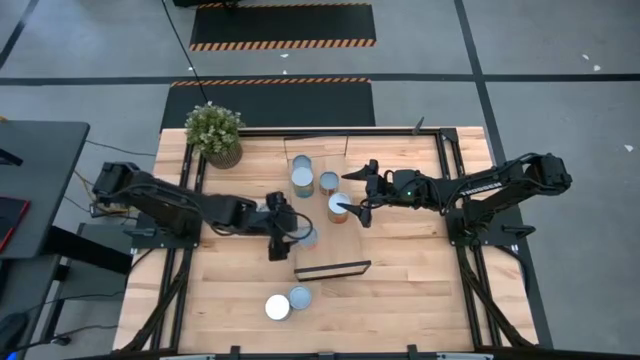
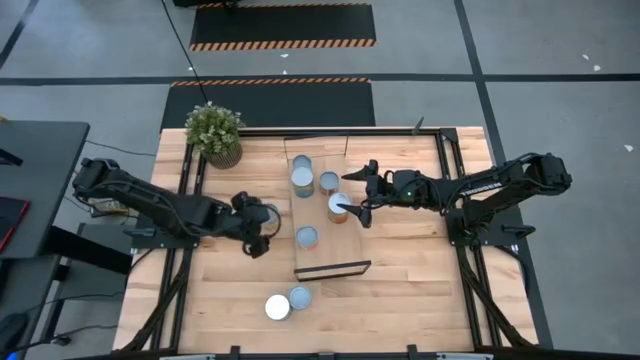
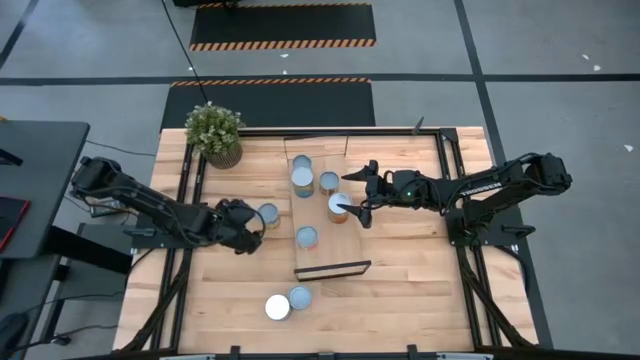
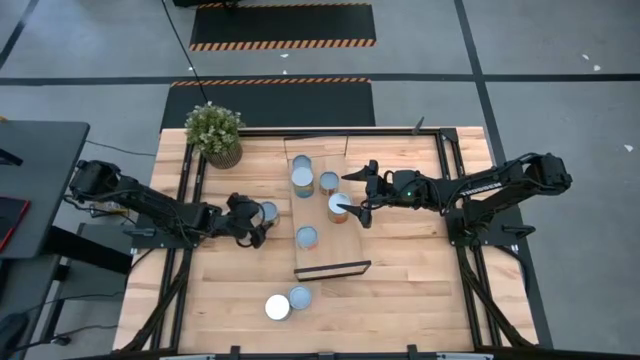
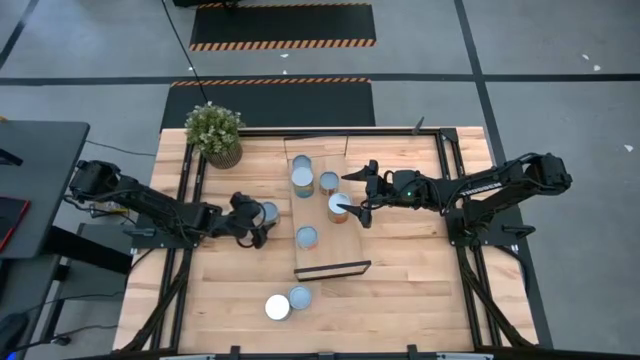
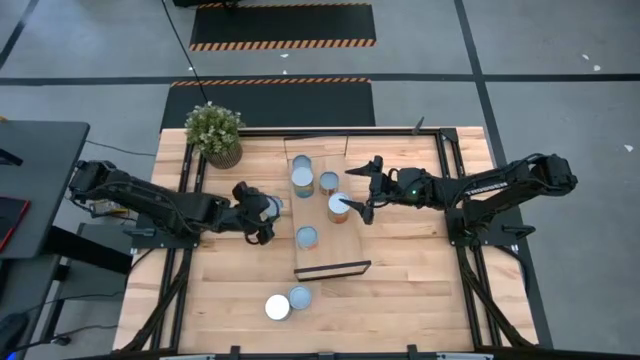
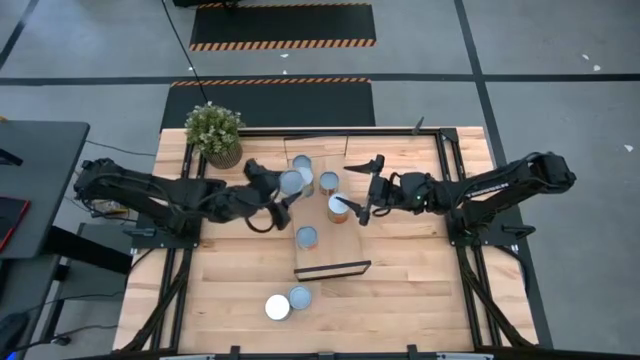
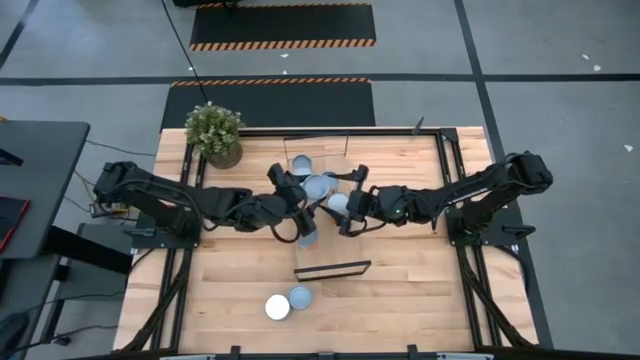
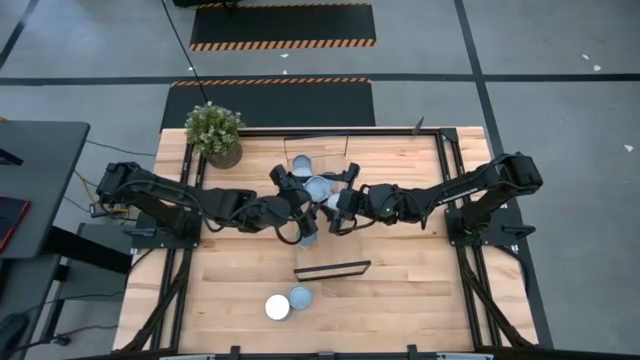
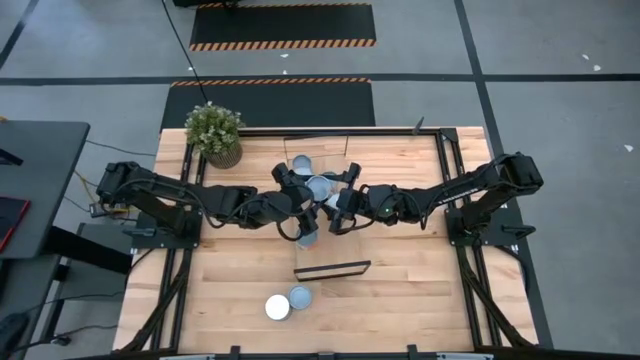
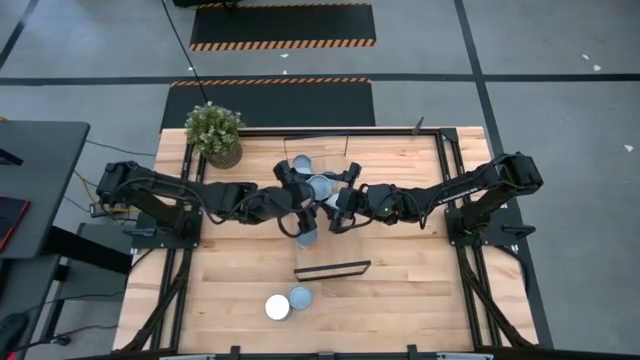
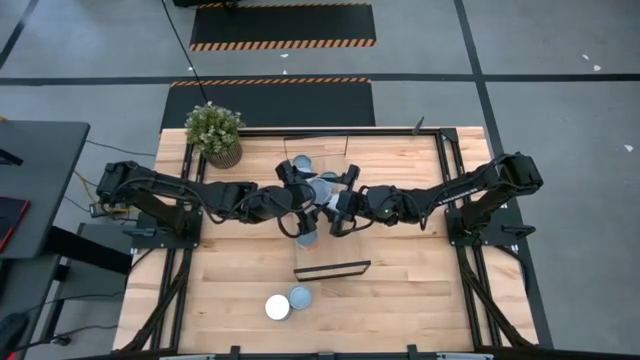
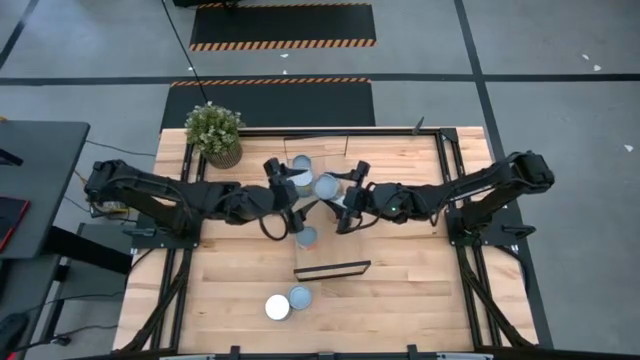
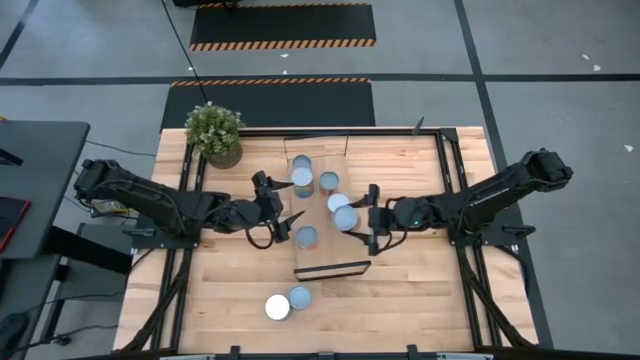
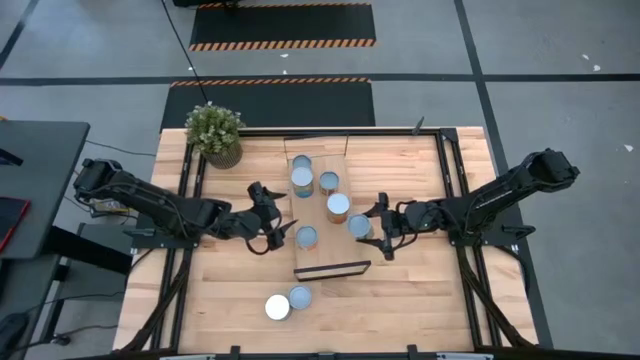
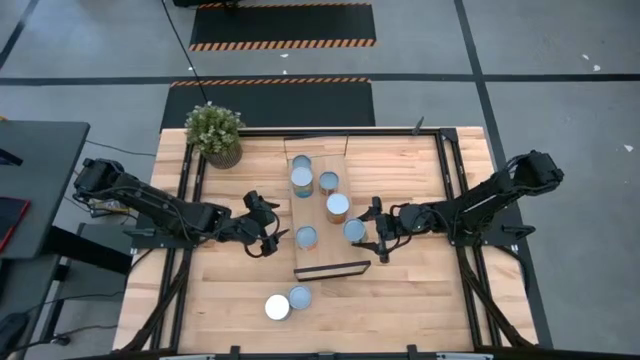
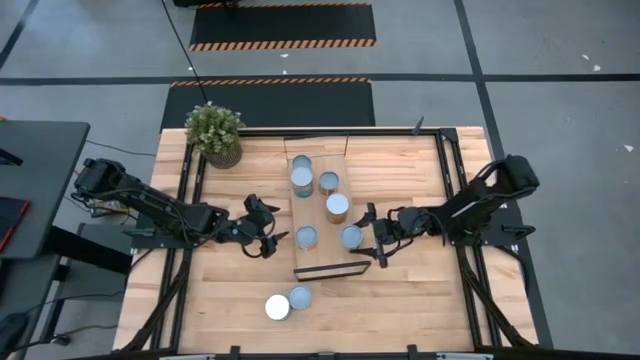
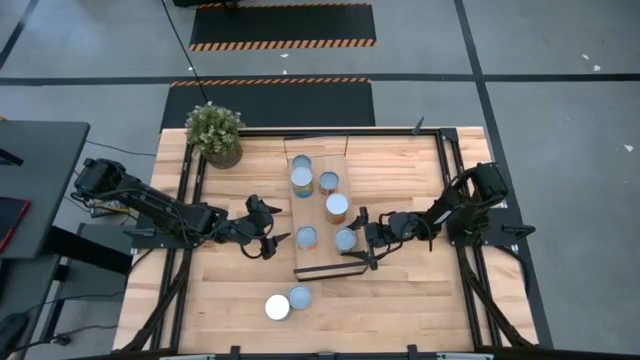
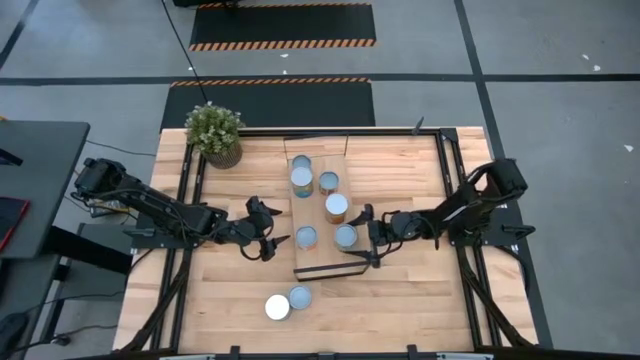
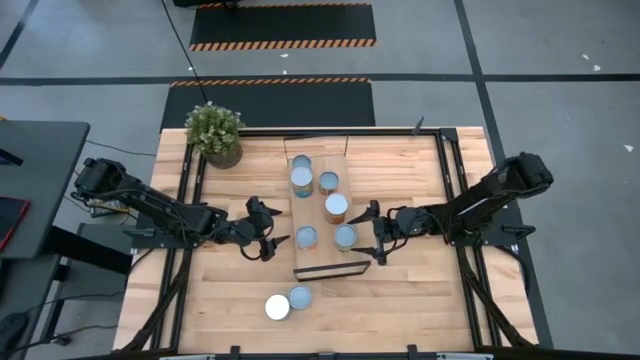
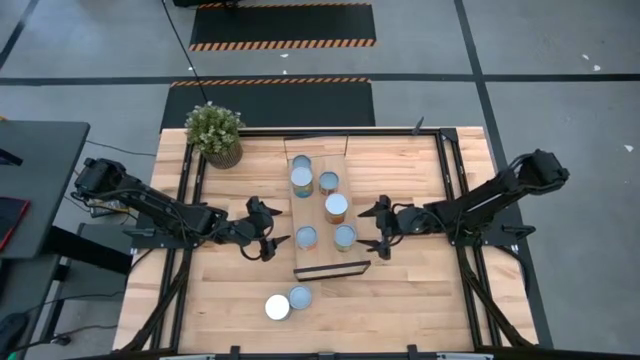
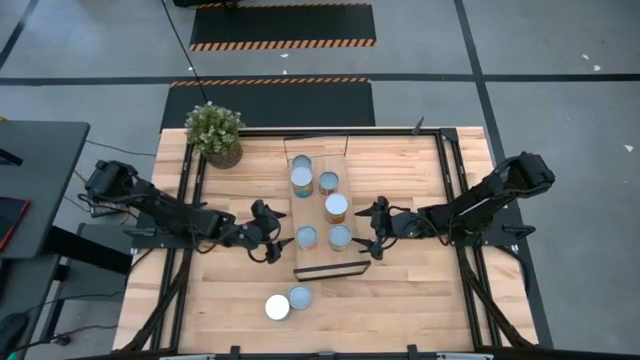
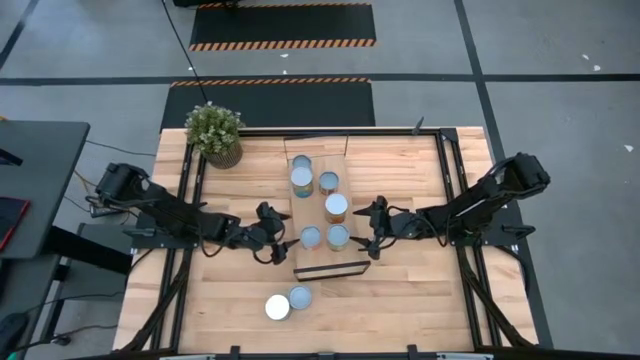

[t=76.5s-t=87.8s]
Task: Pick and place cans onto a shelf
Put the canned spaghetti sauce on the shelf

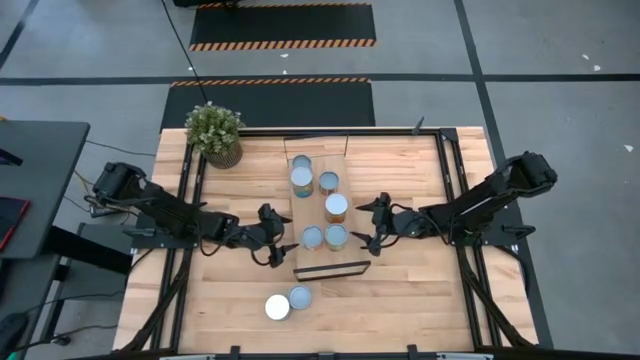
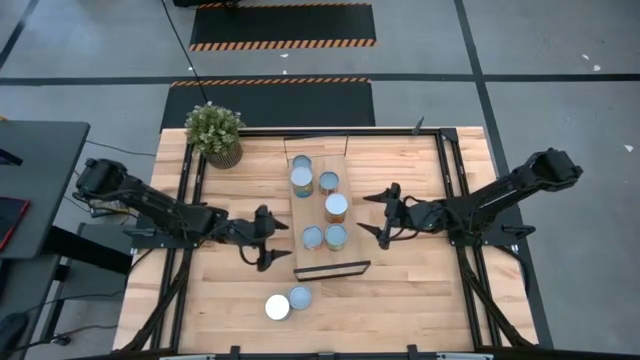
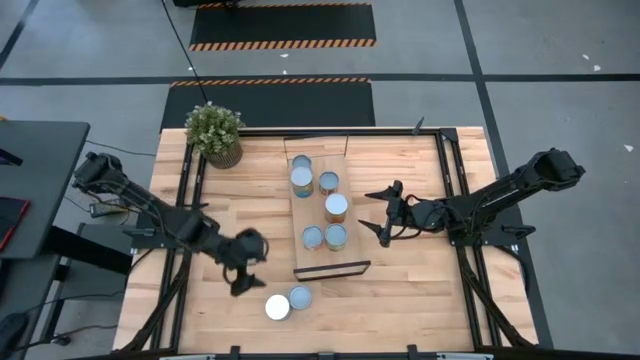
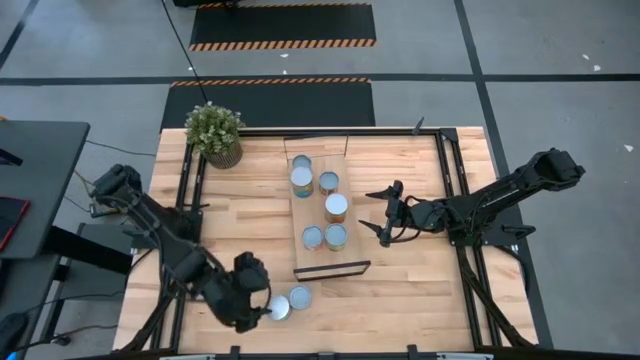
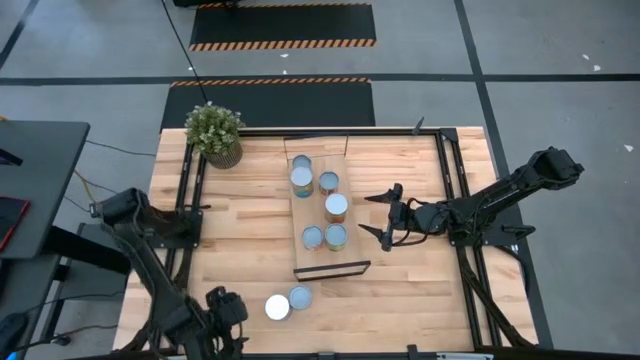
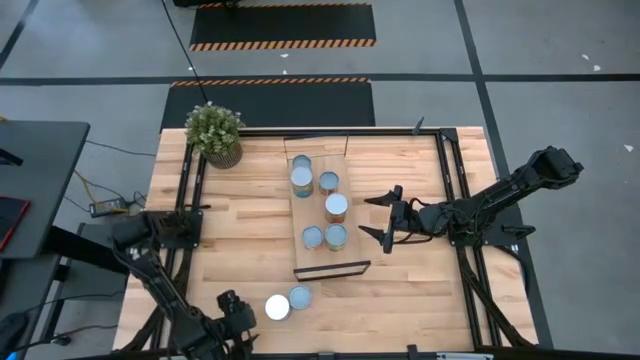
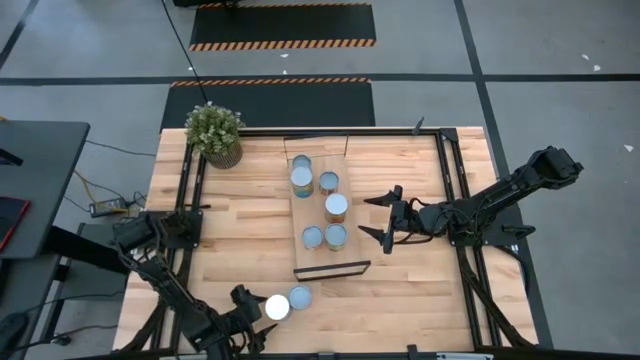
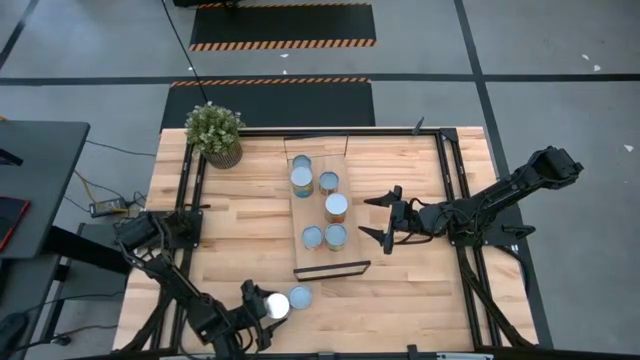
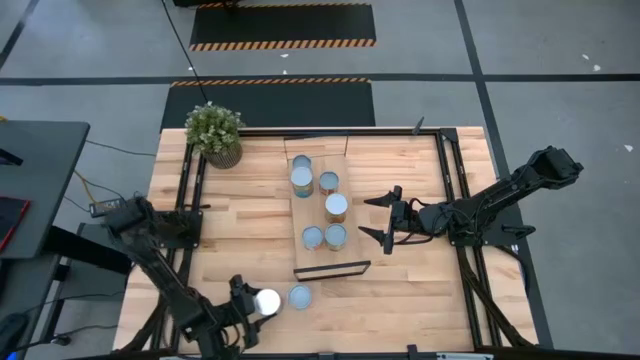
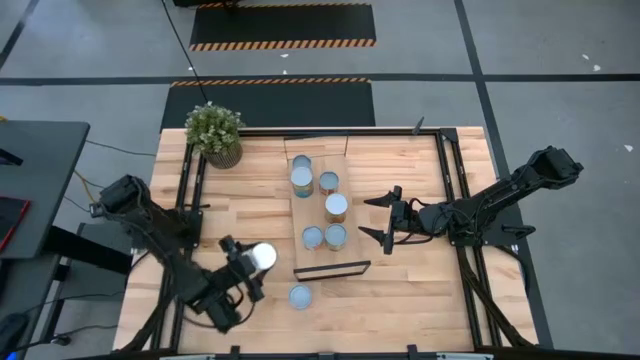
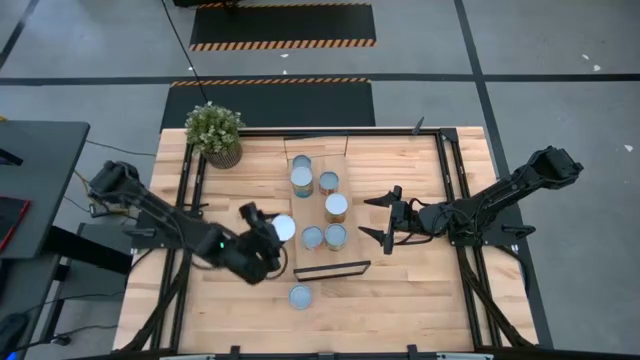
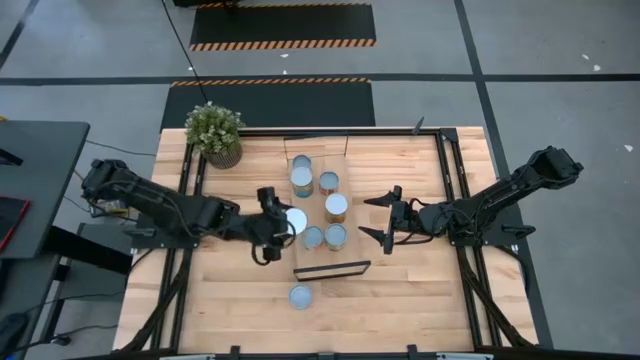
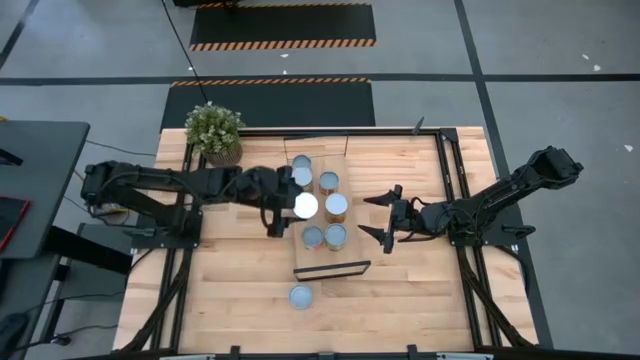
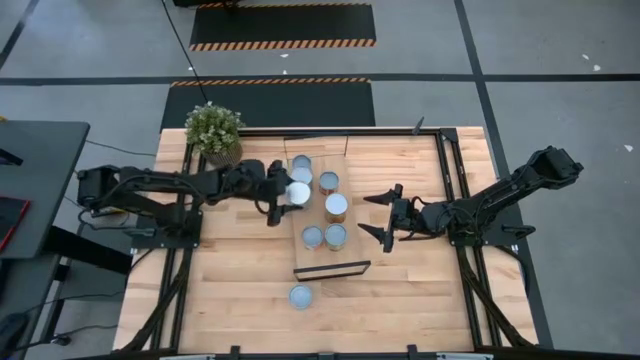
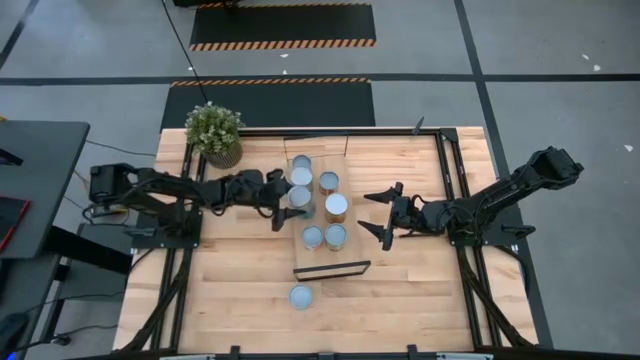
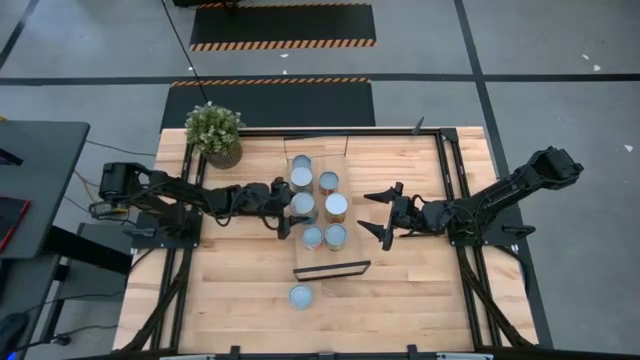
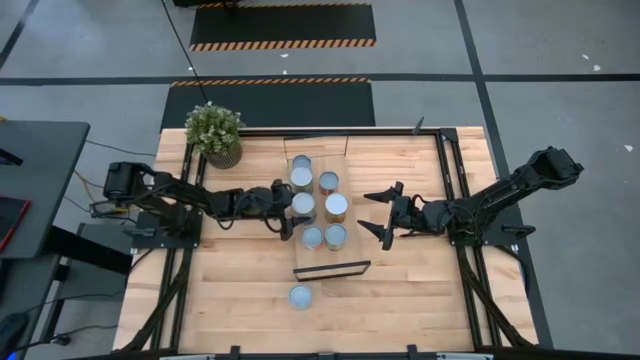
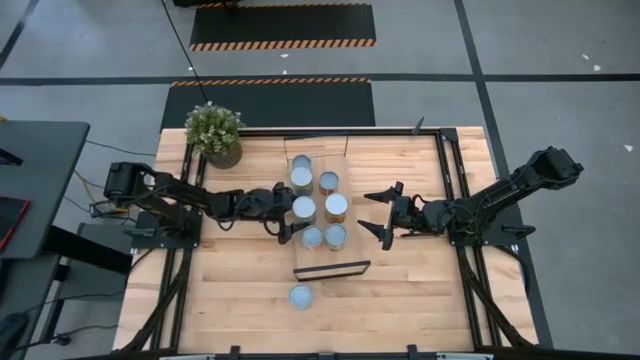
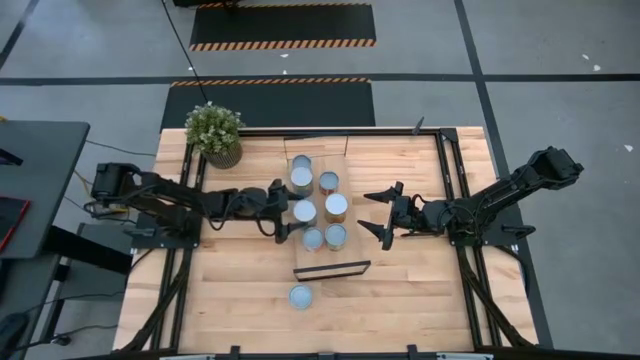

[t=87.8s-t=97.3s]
Put the canned cherries on the shelf
